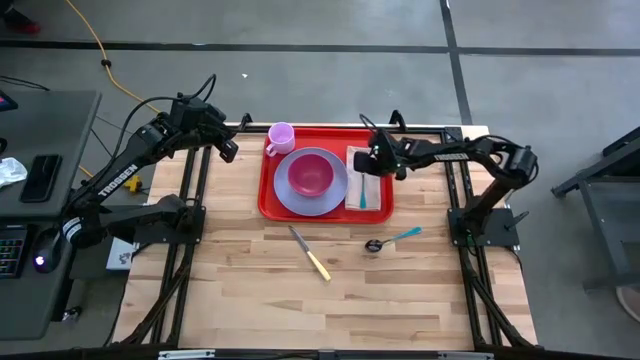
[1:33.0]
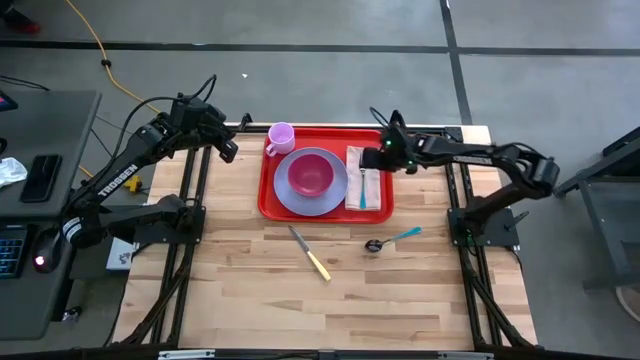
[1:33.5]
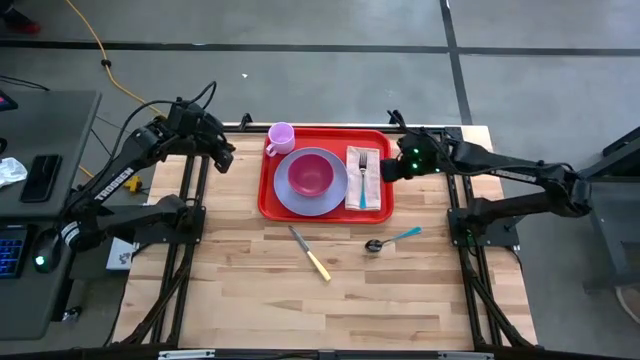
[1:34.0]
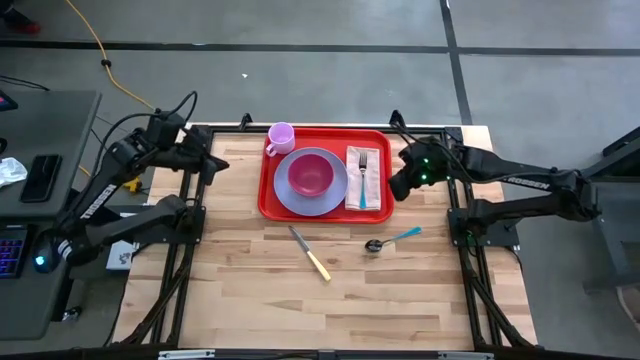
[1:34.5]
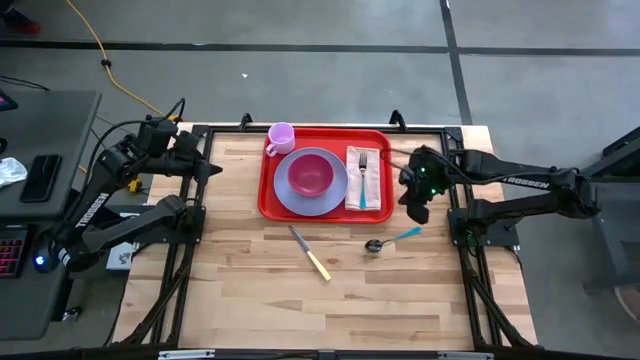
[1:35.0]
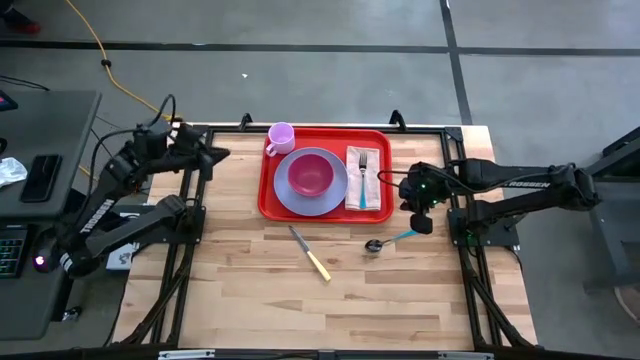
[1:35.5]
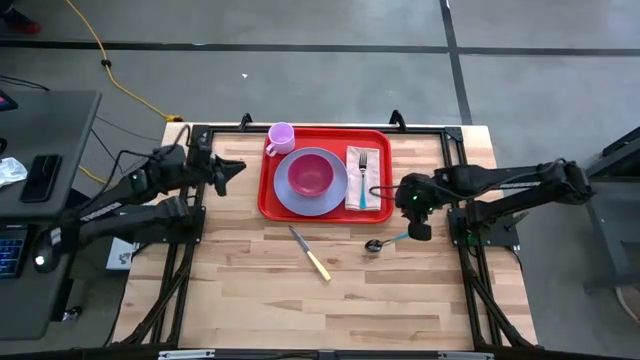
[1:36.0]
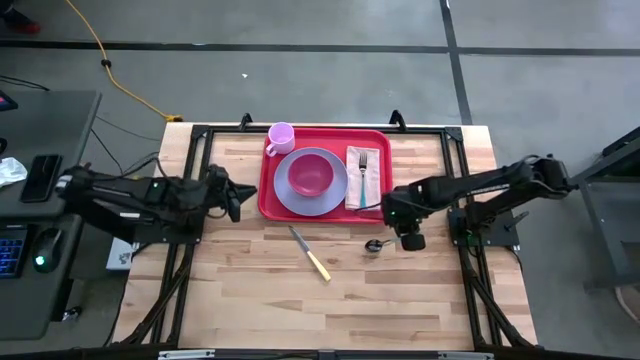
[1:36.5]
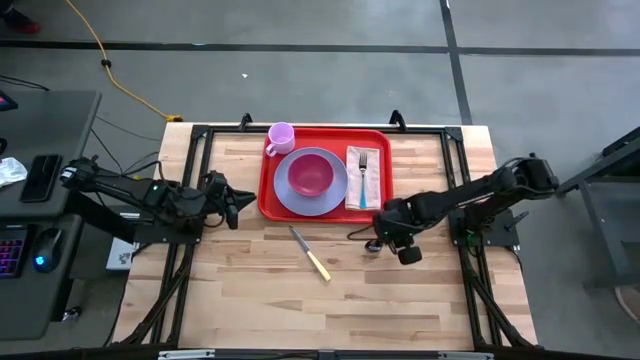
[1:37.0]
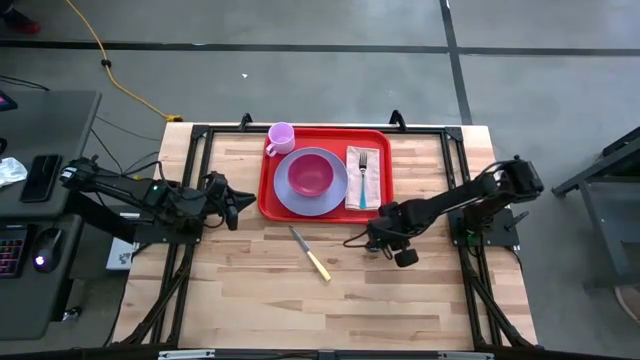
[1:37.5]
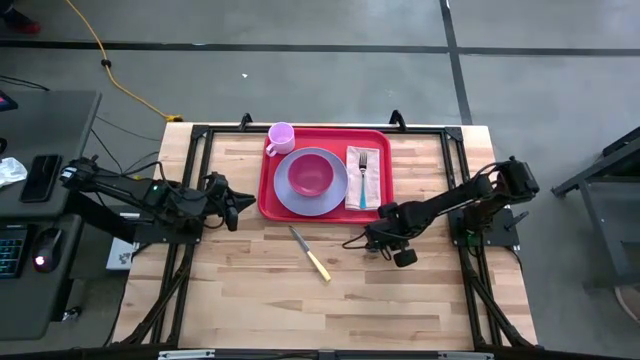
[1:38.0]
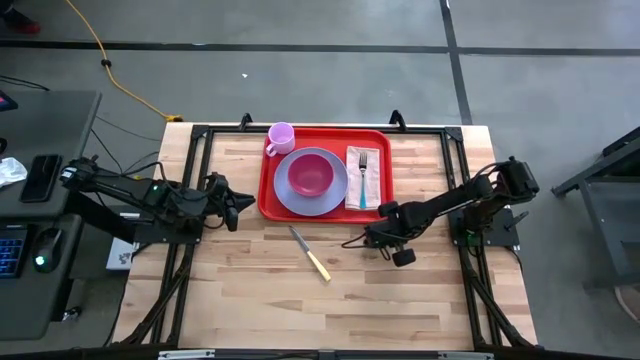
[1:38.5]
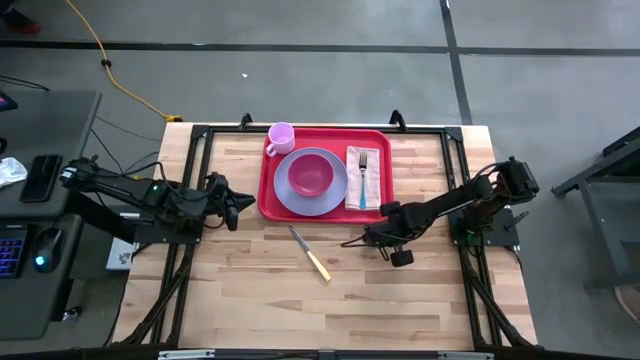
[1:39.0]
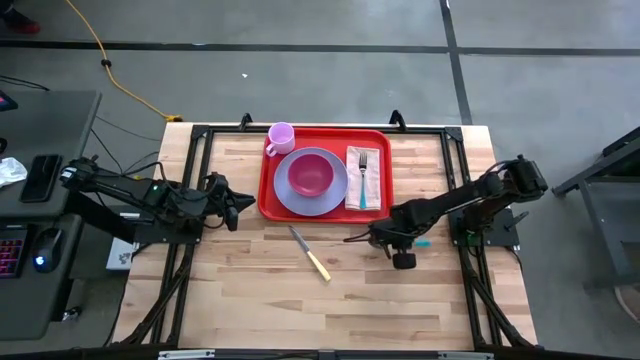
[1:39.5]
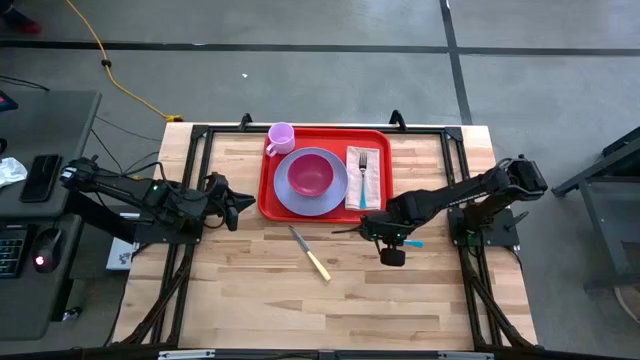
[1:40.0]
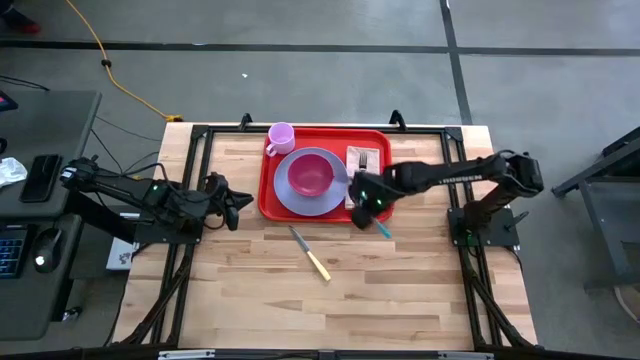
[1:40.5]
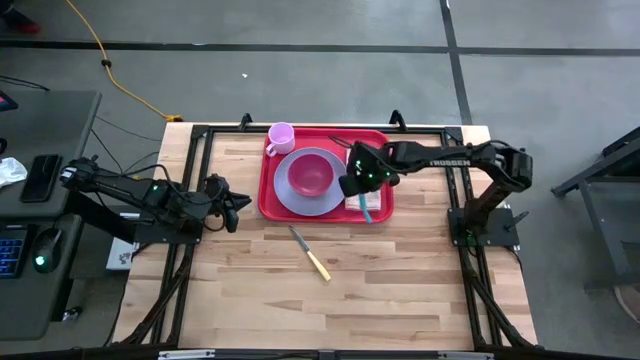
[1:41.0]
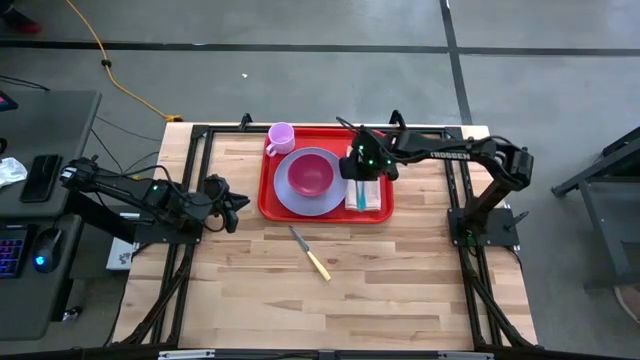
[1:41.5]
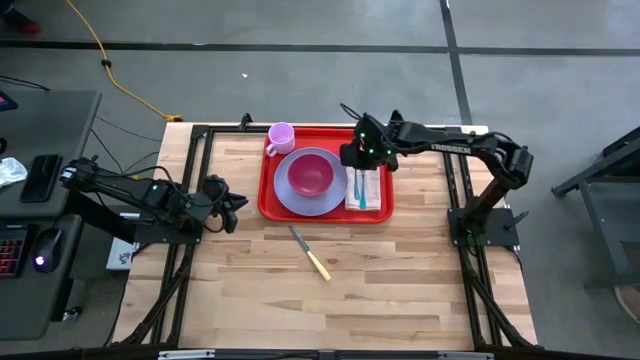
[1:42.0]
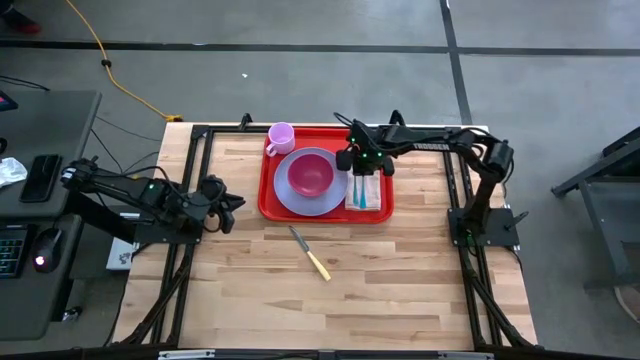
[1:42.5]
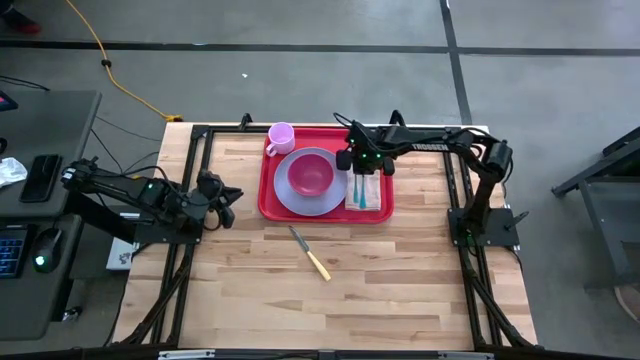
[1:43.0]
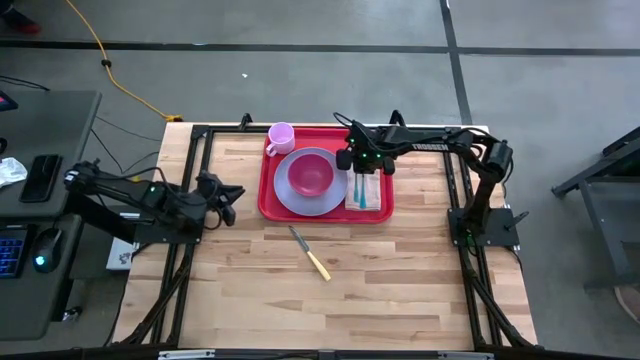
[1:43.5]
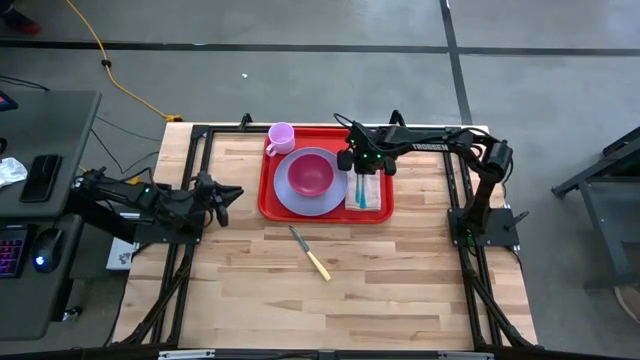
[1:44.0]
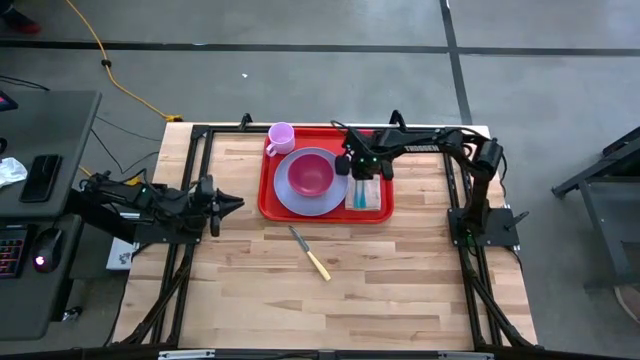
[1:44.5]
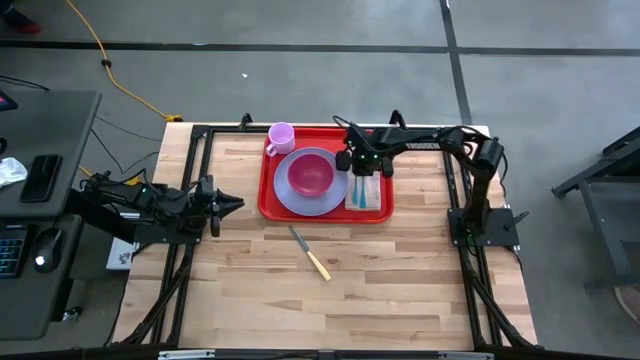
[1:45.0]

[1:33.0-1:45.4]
Task: Set up tray
Put the blue spoon to the left of the blue fork on the light pink napkin

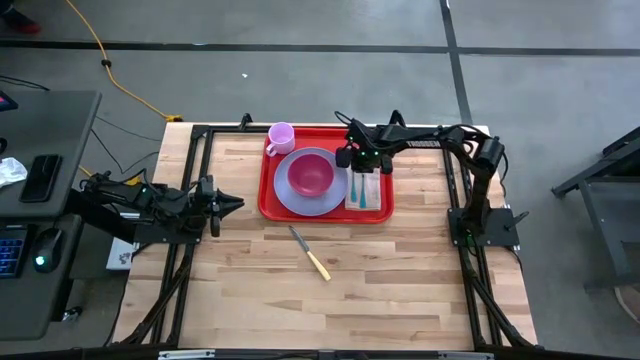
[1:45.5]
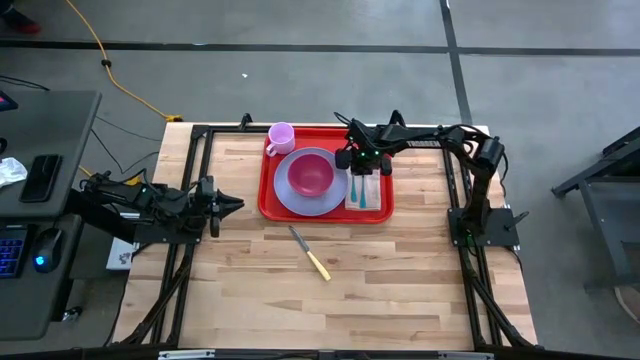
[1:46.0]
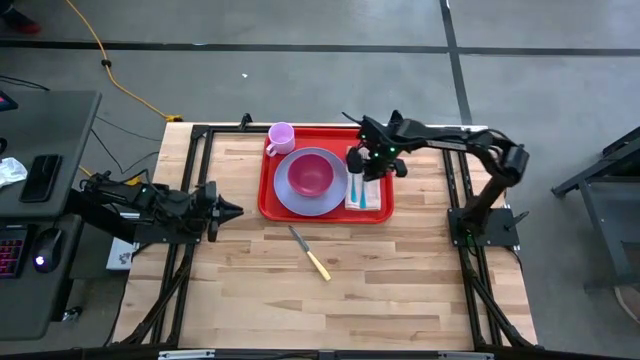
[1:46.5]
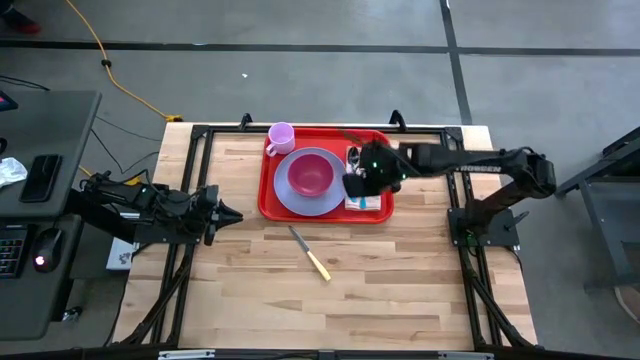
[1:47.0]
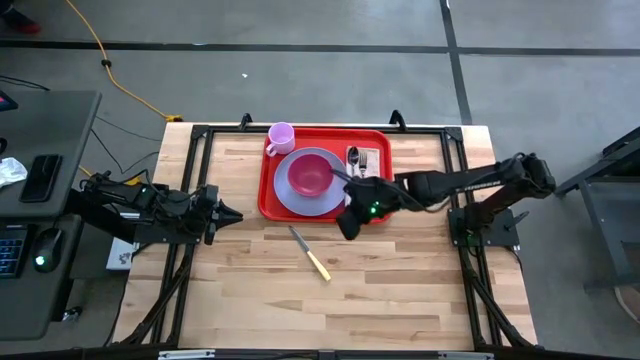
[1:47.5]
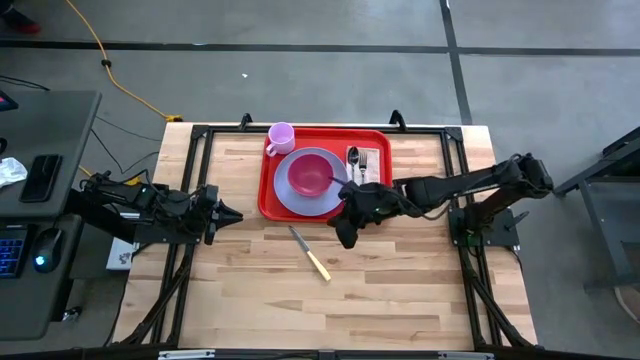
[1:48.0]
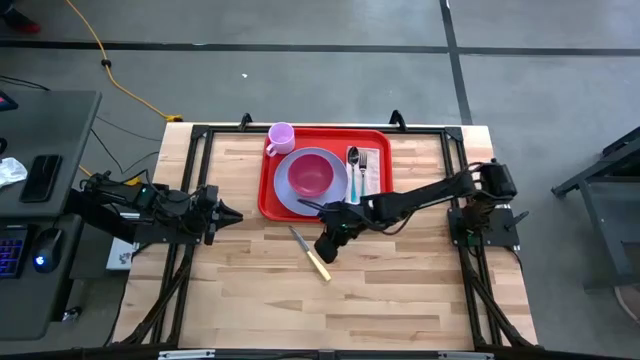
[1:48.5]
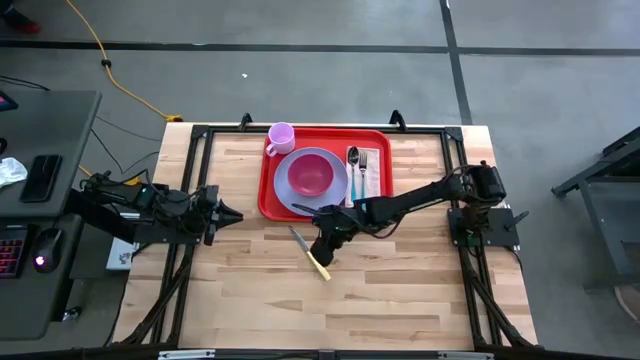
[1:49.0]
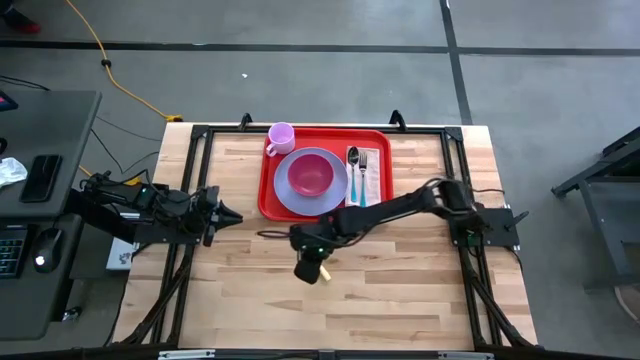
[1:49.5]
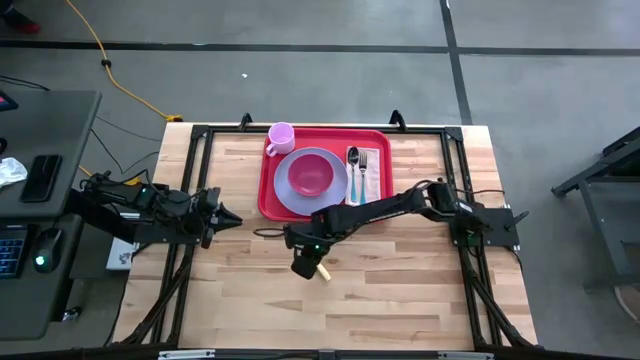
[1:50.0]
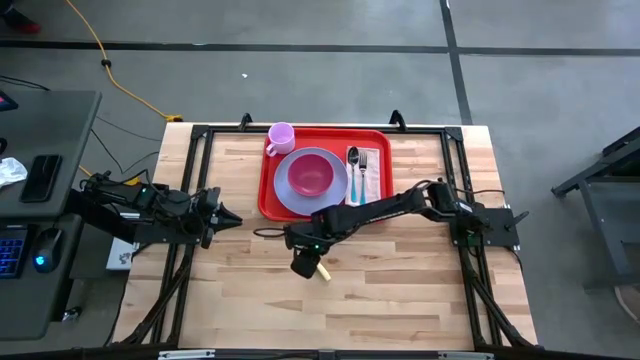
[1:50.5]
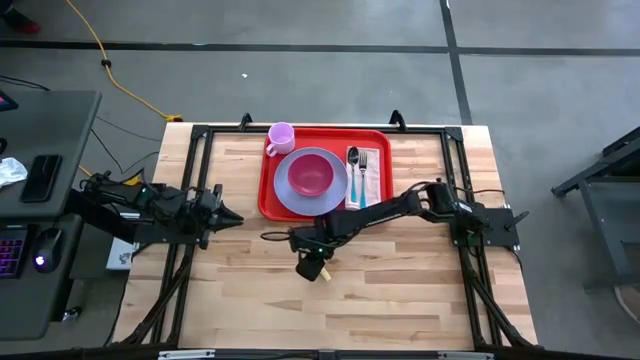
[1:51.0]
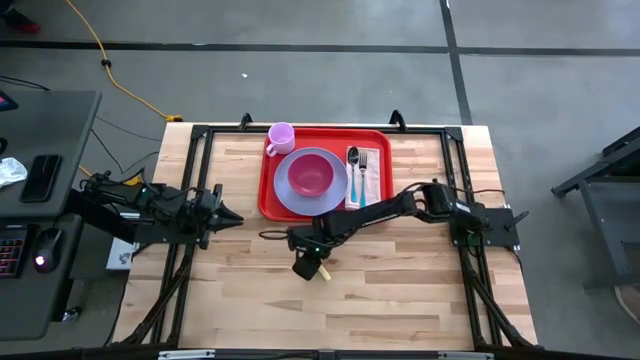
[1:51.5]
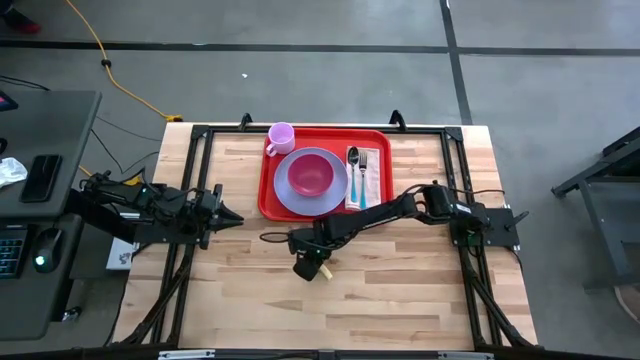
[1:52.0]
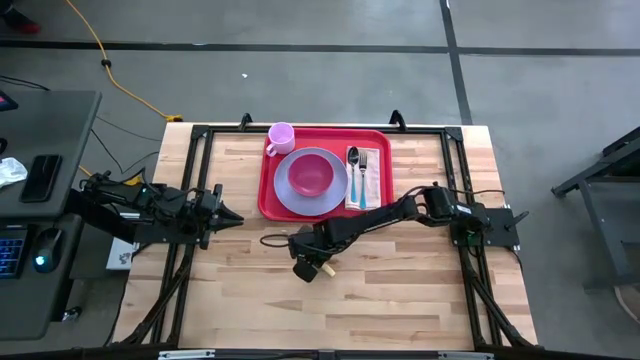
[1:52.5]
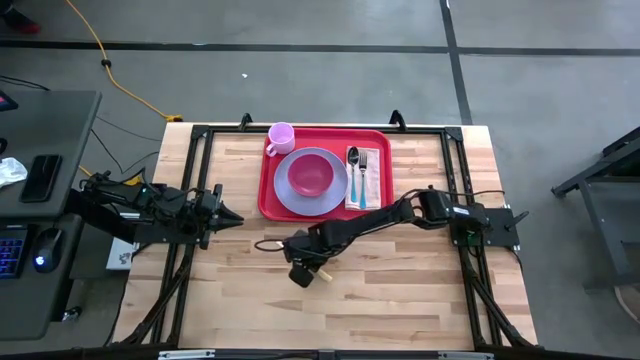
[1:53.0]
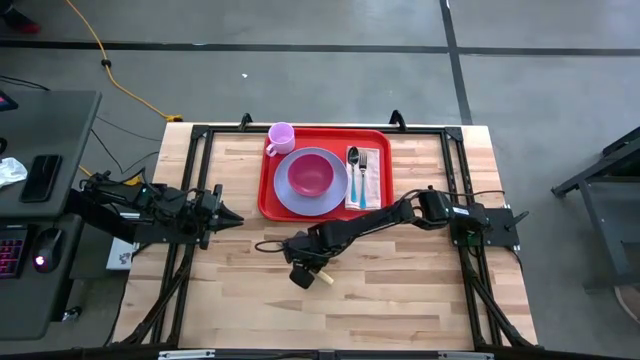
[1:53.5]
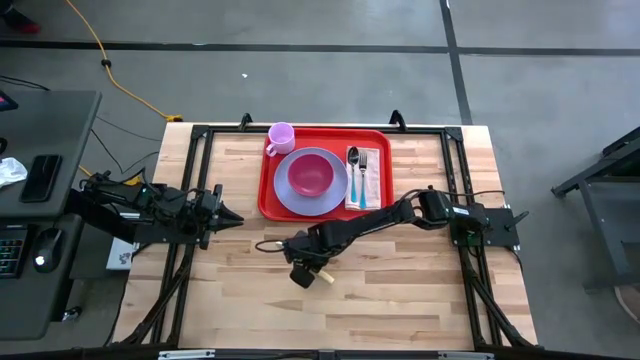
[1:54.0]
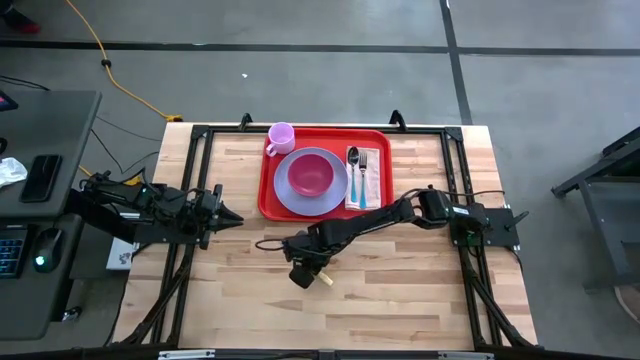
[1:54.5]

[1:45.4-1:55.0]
Put the yellow knife to the right of the blue fork on the light pink napkin
